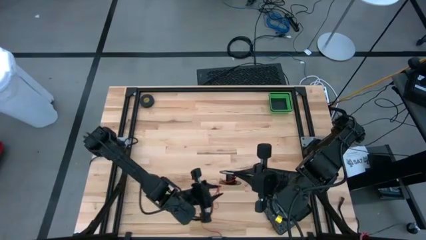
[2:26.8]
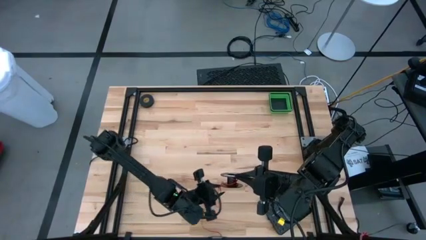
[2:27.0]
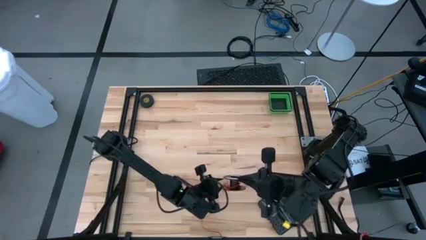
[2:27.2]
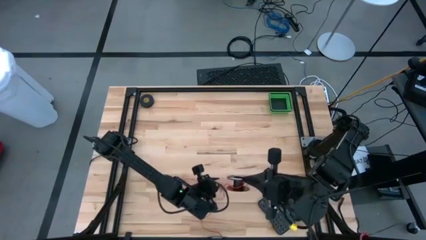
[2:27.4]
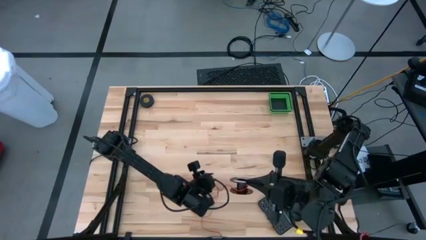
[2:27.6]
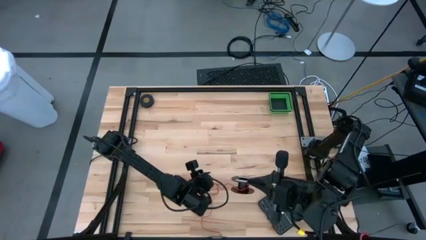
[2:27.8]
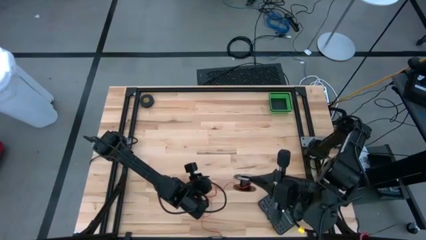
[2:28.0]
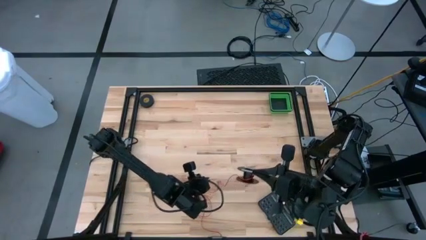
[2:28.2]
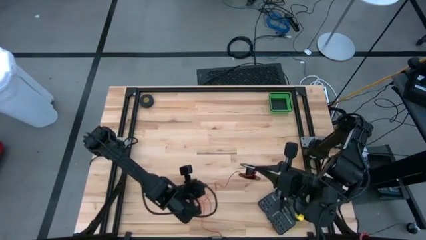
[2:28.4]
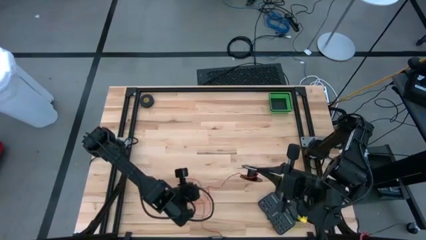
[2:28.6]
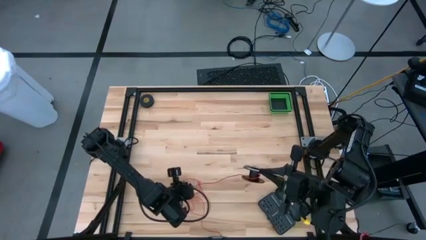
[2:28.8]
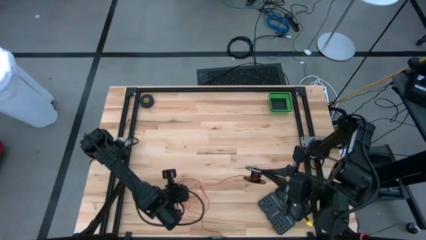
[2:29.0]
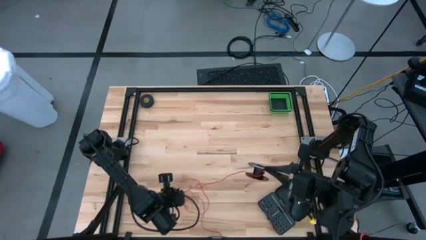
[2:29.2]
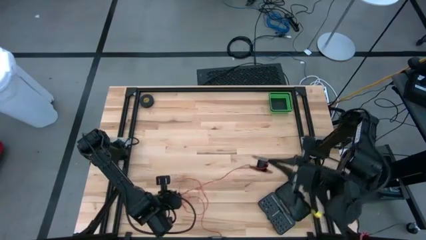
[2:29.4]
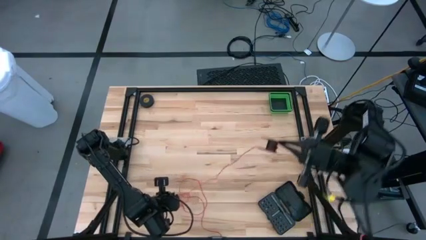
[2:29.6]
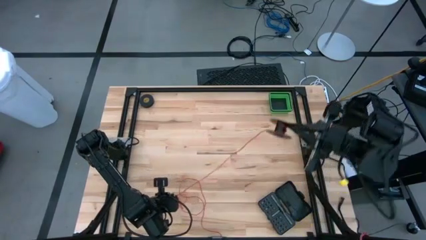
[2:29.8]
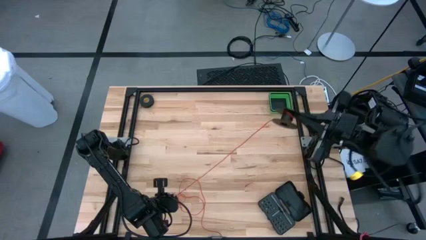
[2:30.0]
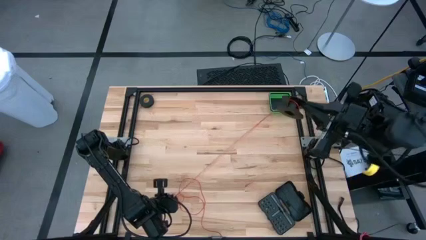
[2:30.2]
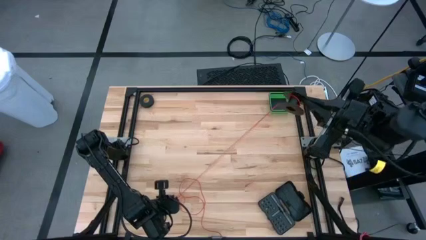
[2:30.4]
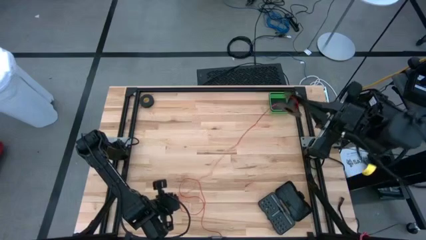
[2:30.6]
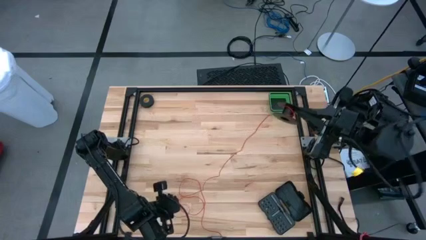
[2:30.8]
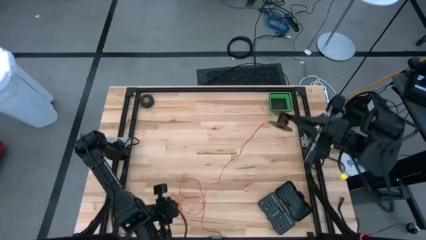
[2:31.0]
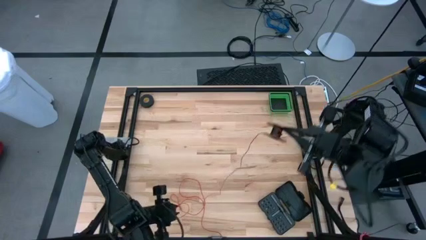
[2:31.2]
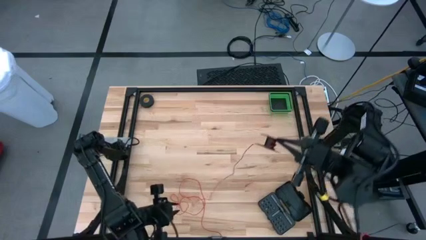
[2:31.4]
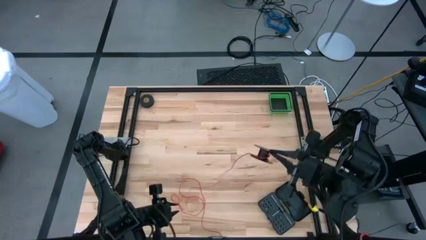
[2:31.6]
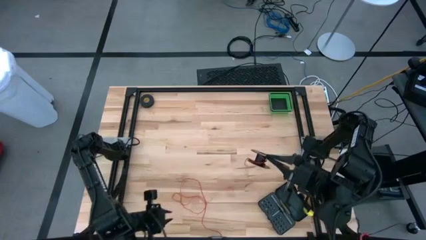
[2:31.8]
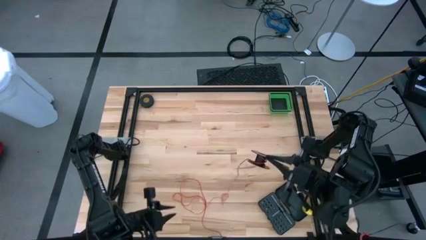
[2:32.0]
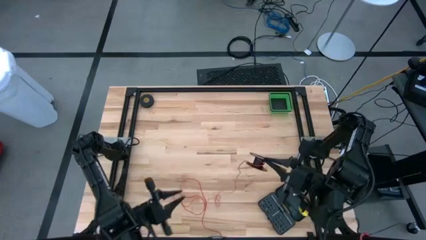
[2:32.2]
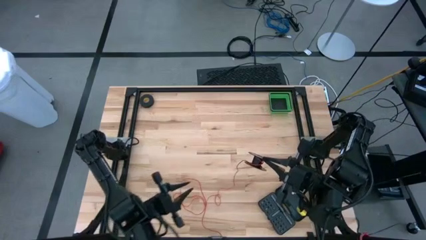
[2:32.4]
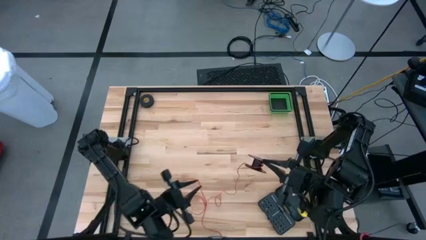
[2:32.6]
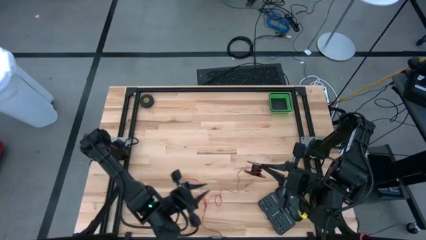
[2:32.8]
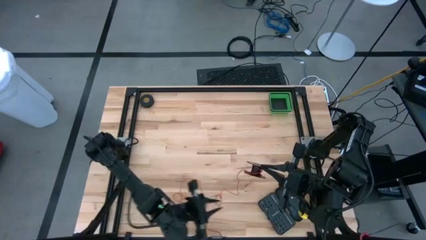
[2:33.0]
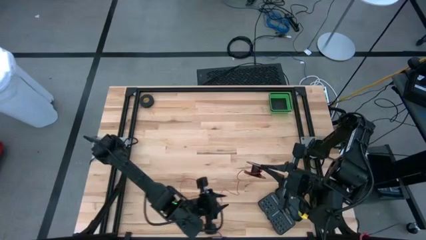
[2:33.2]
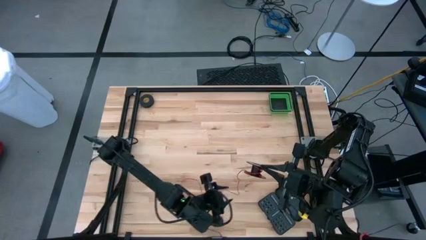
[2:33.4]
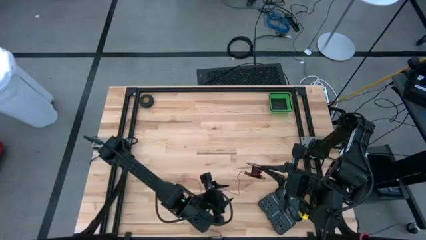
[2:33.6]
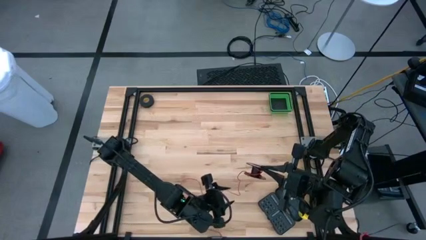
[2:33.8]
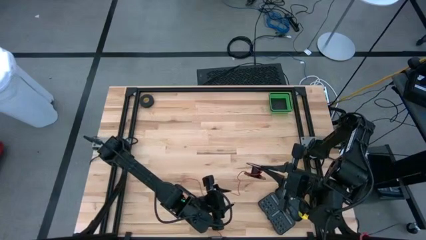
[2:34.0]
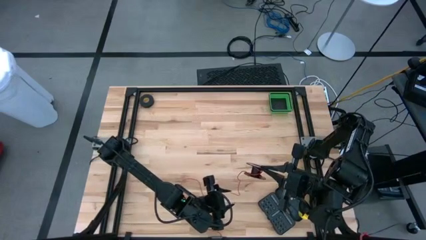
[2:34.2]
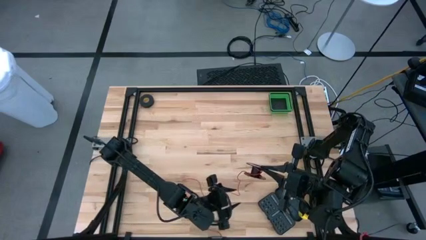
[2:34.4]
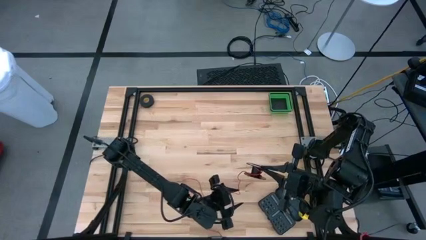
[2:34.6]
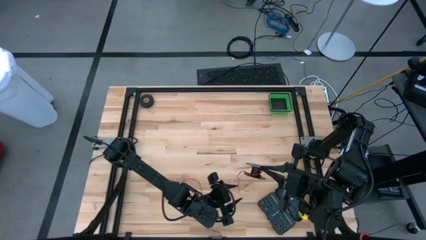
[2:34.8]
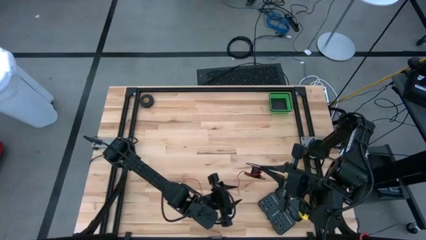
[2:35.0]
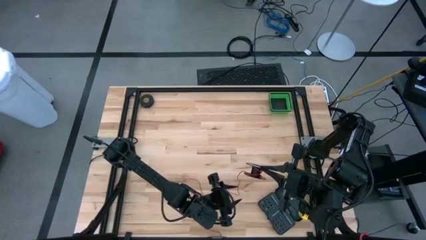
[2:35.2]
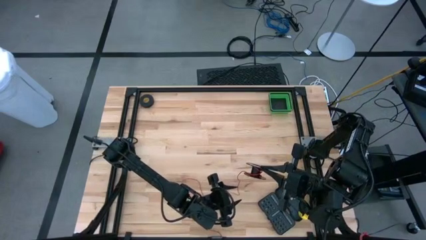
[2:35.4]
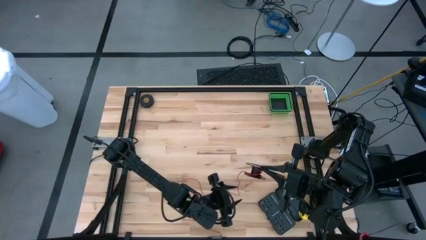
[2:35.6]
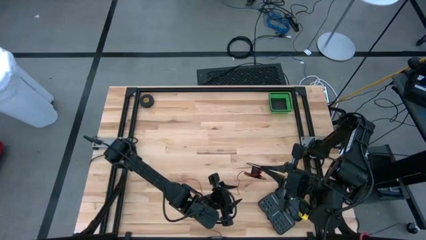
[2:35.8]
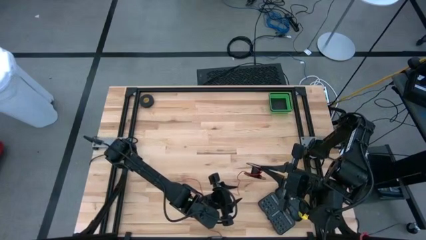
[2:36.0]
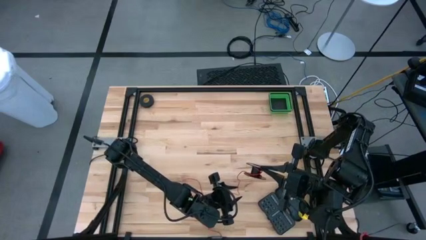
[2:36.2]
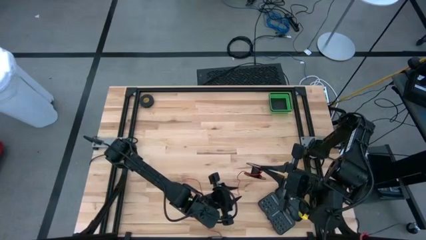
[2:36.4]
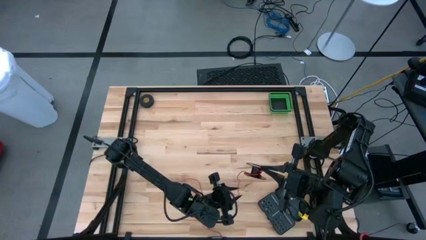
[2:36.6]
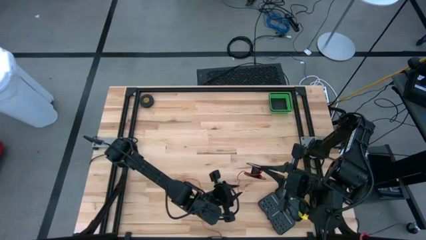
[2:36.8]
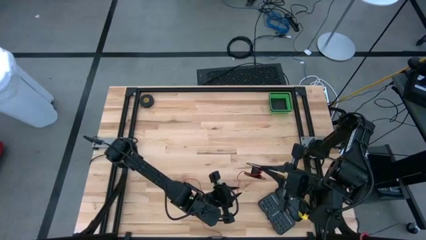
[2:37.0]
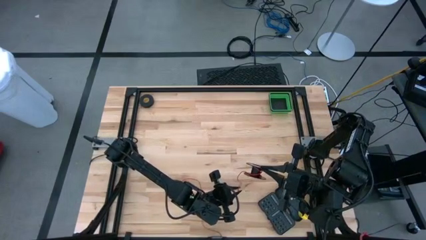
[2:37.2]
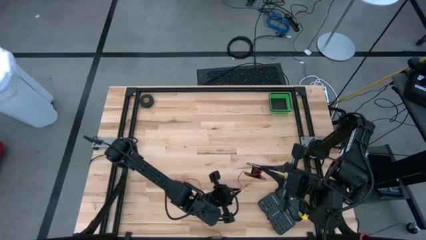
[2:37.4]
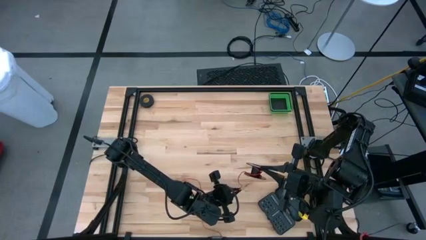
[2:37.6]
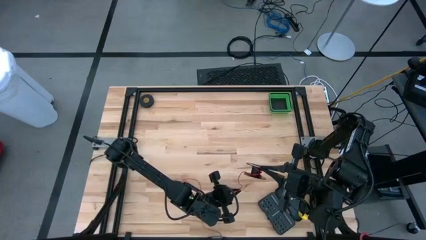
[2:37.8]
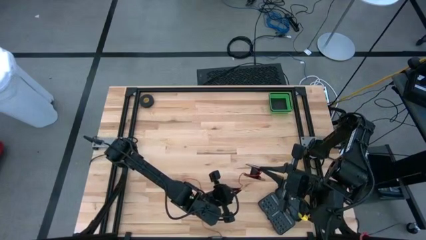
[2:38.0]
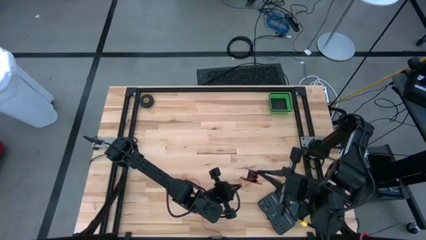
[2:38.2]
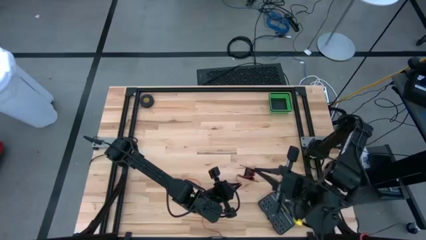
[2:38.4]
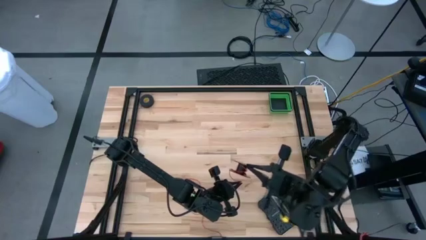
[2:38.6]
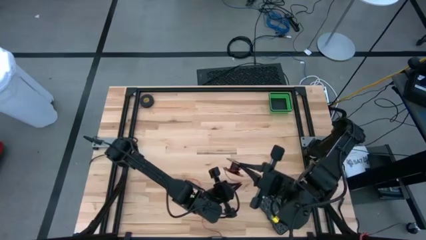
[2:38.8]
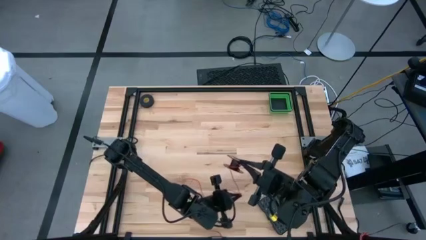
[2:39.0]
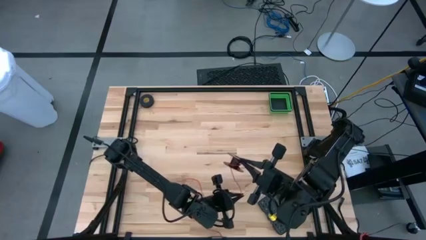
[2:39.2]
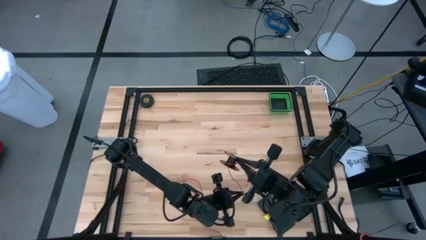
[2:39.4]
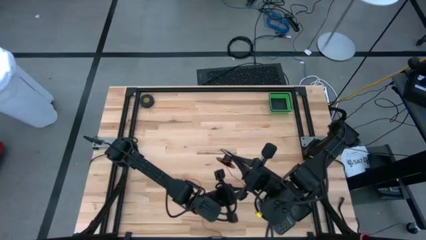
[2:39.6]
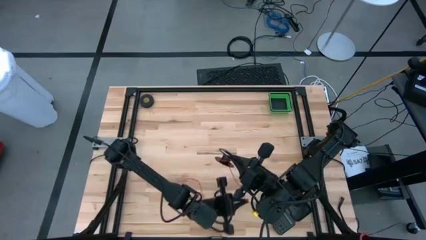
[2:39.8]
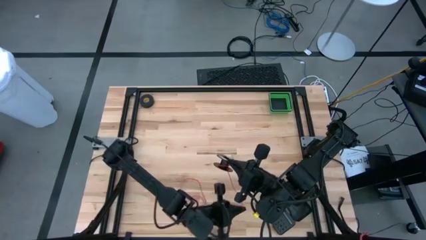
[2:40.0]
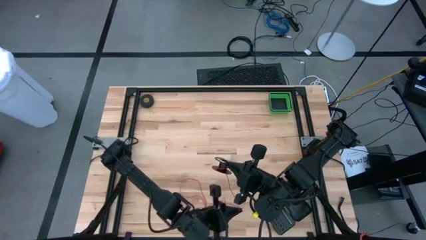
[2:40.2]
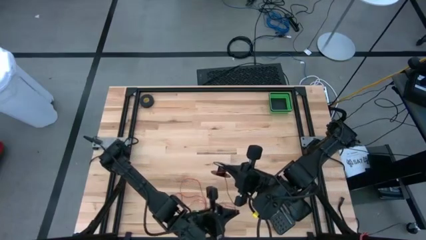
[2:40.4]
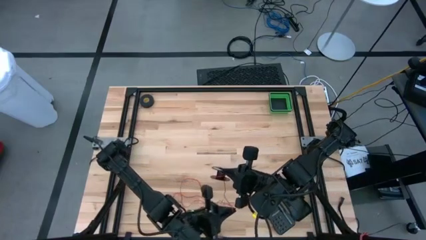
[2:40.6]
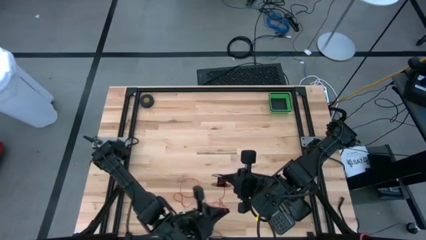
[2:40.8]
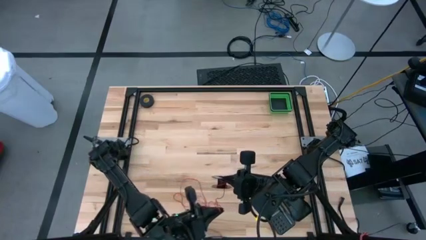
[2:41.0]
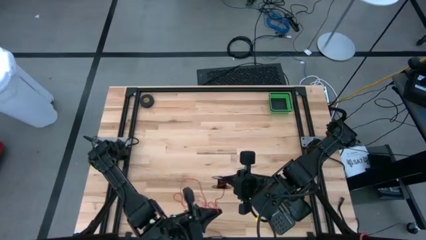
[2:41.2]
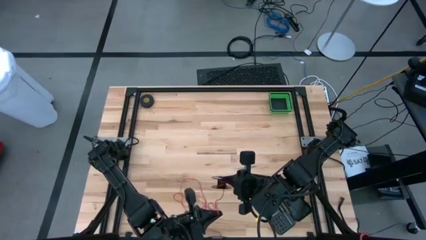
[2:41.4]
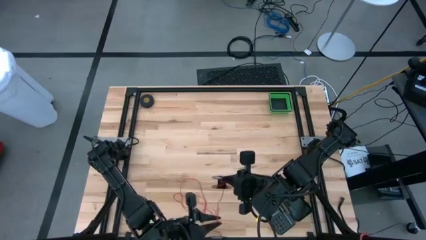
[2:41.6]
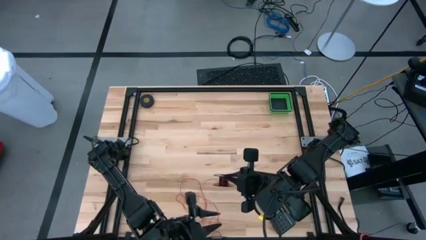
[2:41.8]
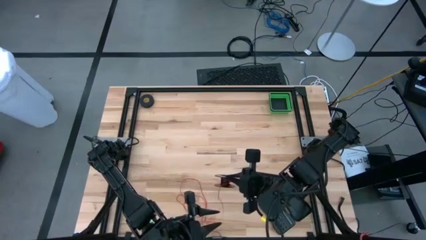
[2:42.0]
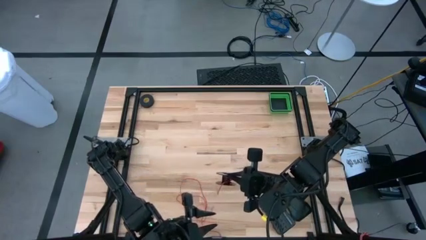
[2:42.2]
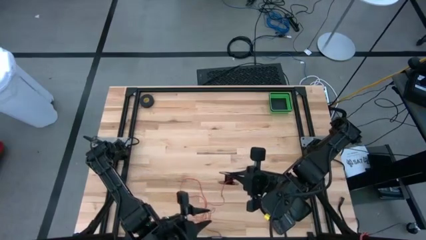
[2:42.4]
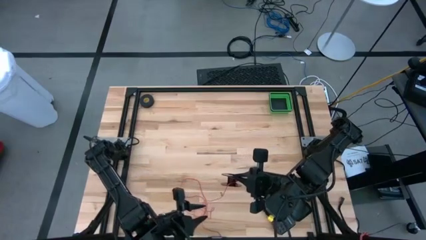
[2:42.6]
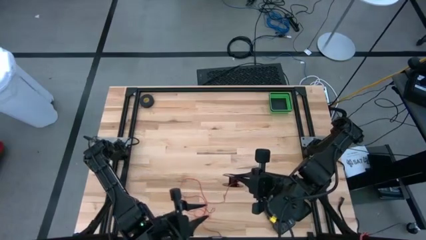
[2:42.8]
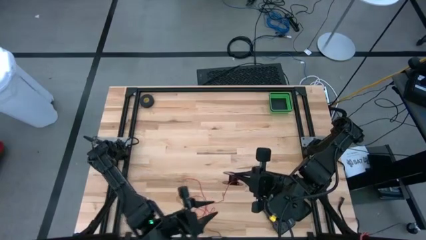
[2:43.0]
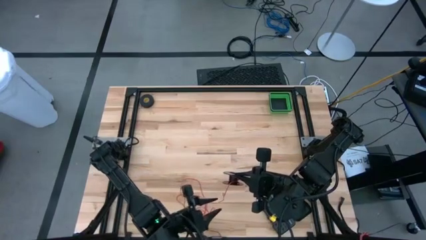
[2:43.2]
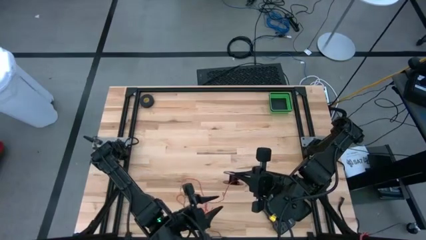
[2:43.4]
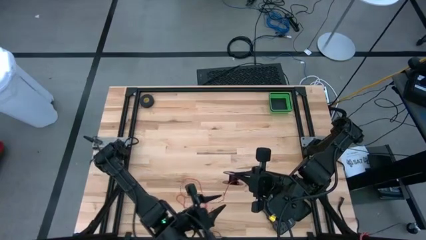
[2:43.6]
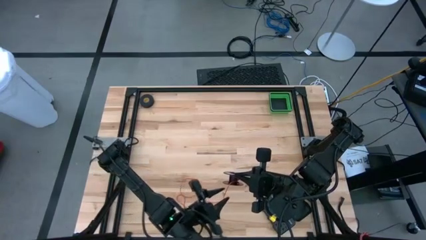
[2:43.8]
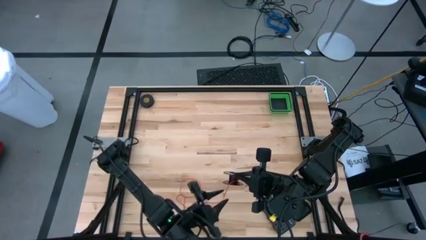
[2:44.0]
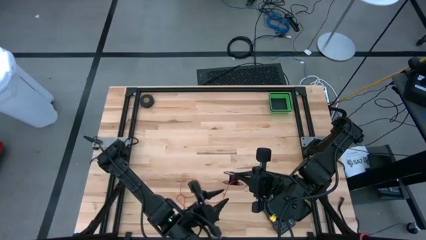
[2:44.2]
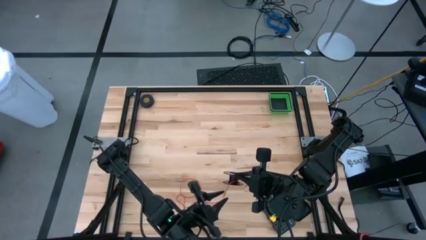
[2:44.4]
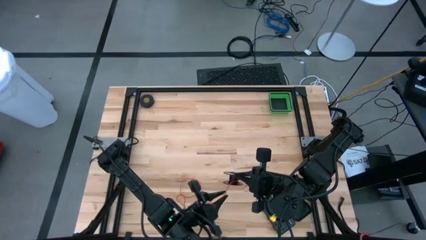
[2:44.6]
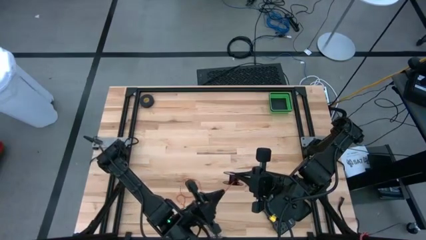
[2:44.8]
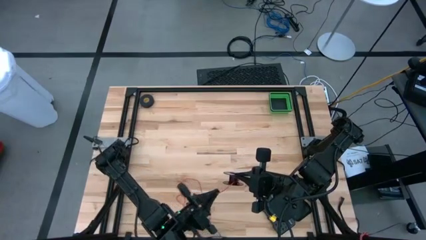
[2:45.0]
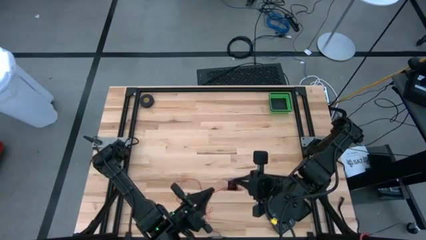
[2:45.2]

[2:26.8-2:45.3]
Task: Coil cords
Coil the red wire on the black spool
